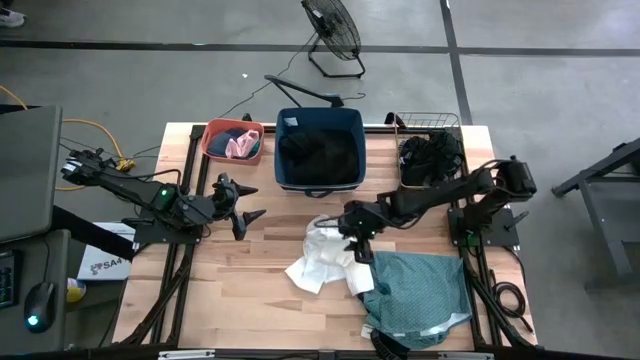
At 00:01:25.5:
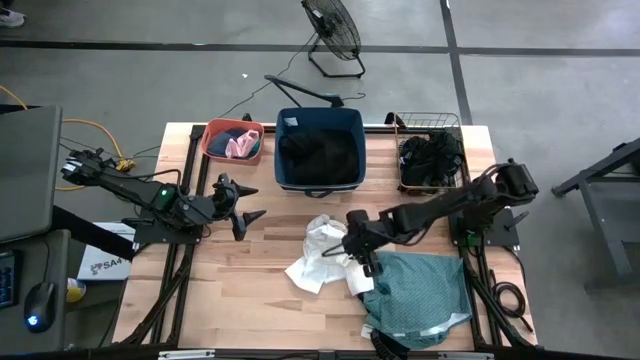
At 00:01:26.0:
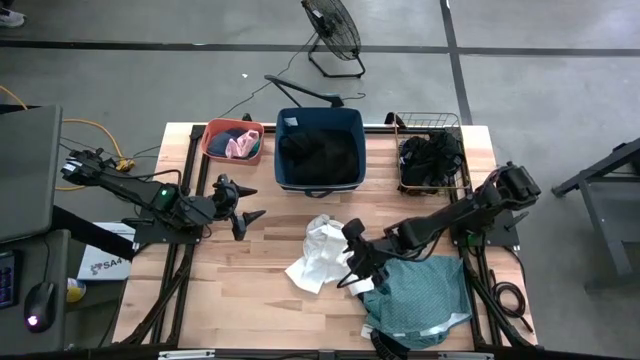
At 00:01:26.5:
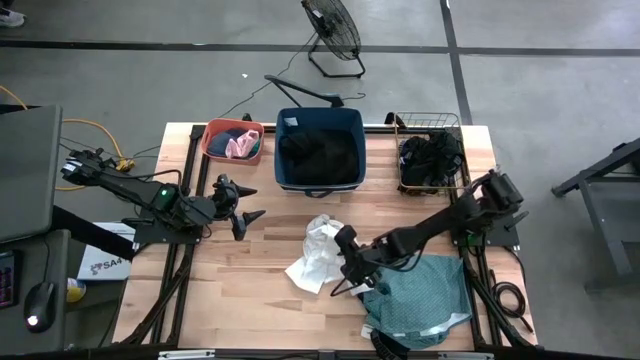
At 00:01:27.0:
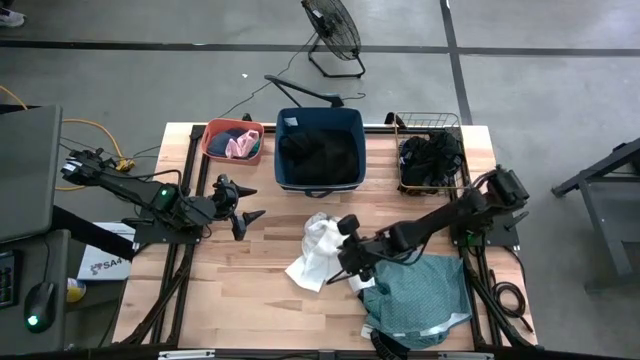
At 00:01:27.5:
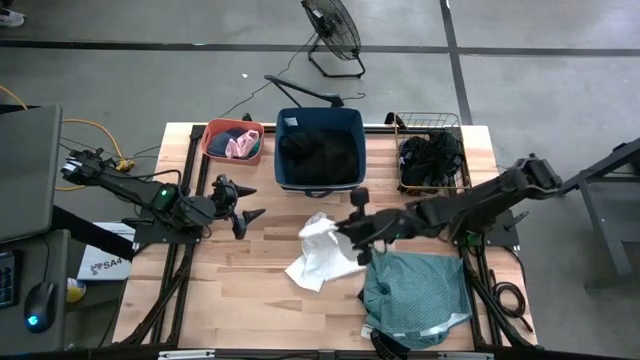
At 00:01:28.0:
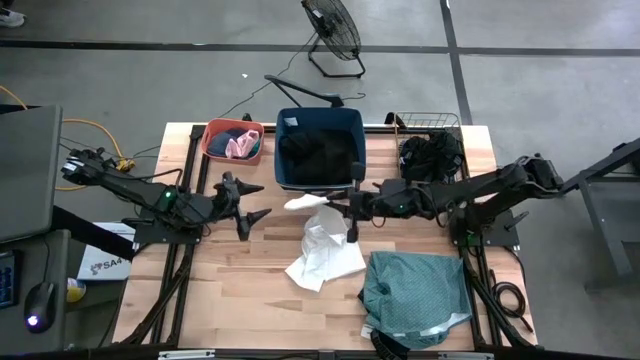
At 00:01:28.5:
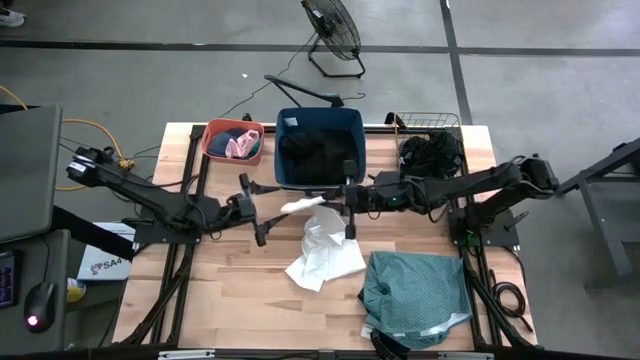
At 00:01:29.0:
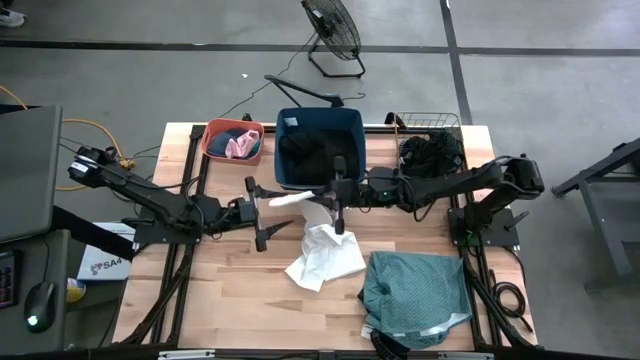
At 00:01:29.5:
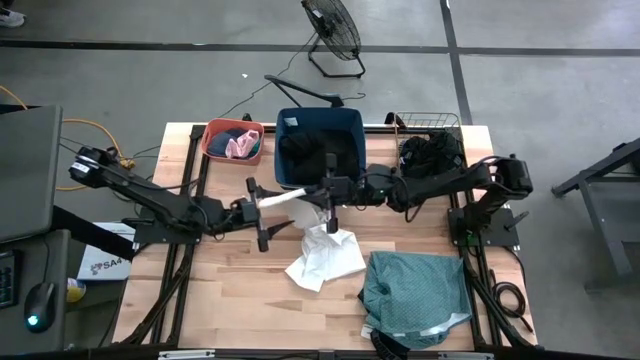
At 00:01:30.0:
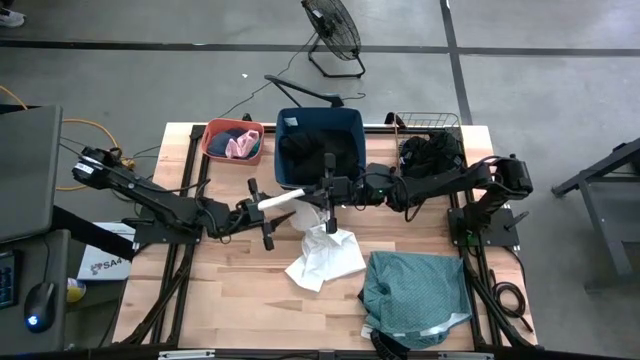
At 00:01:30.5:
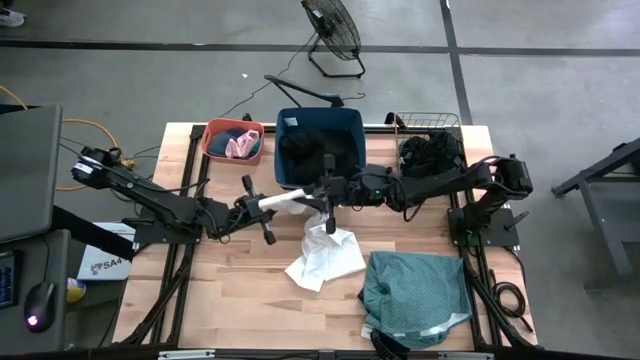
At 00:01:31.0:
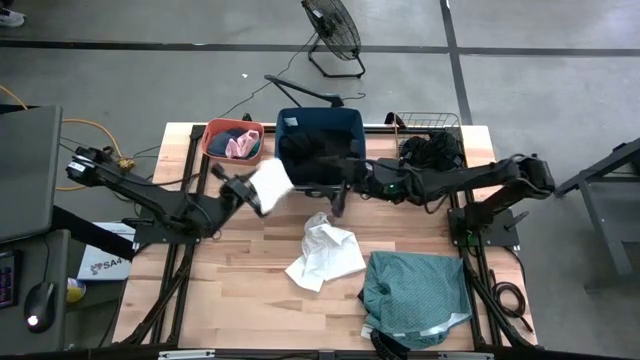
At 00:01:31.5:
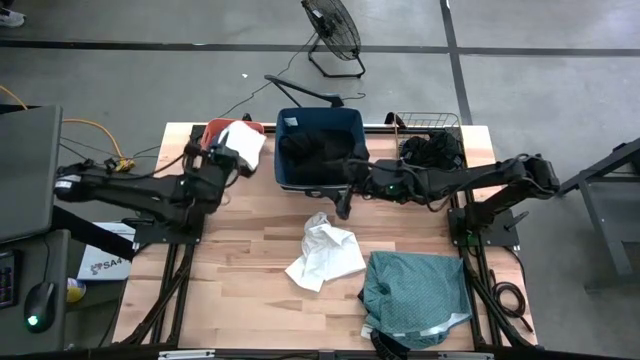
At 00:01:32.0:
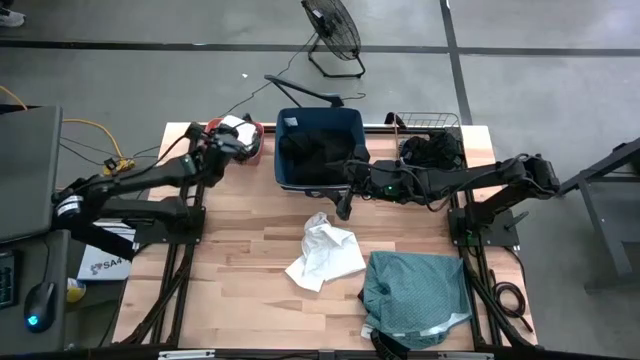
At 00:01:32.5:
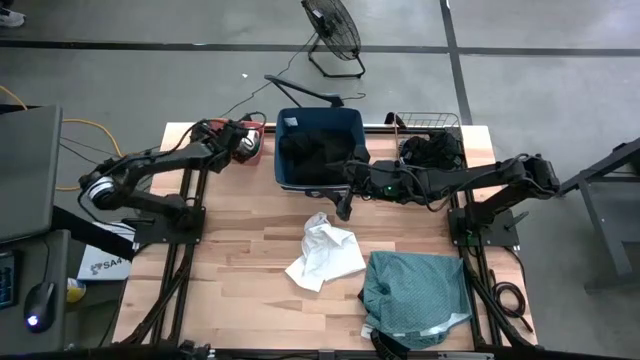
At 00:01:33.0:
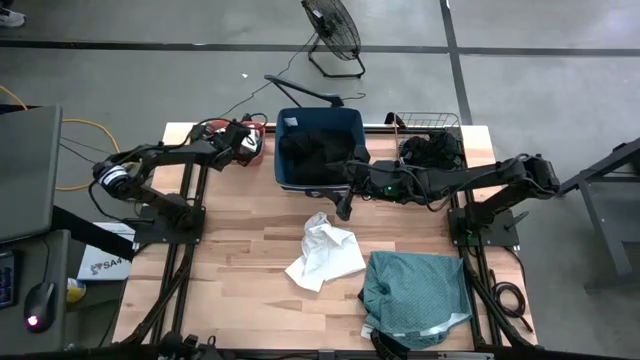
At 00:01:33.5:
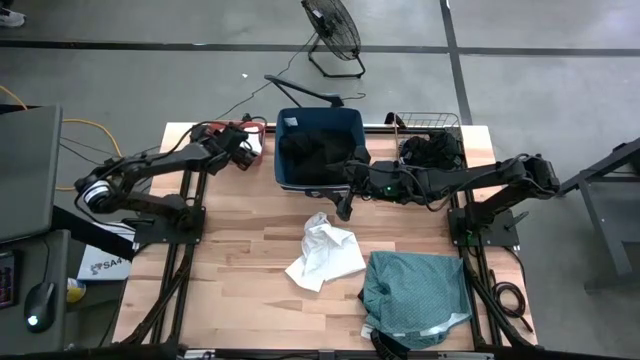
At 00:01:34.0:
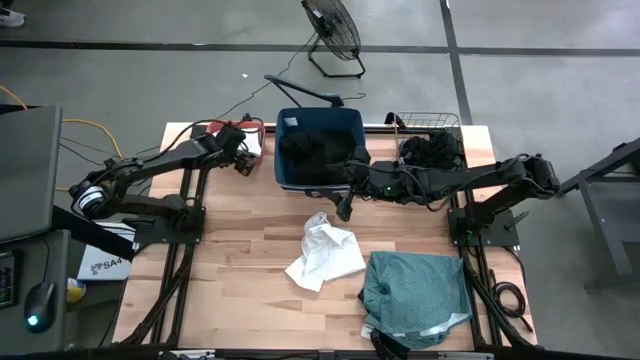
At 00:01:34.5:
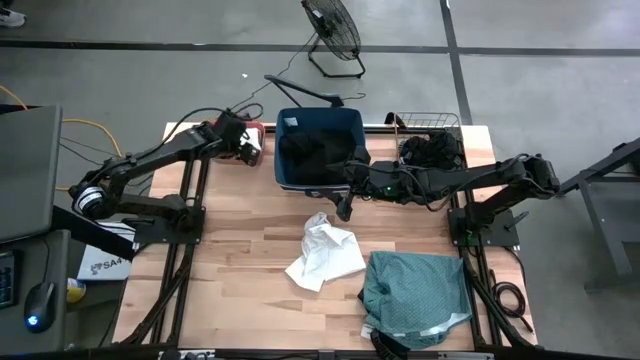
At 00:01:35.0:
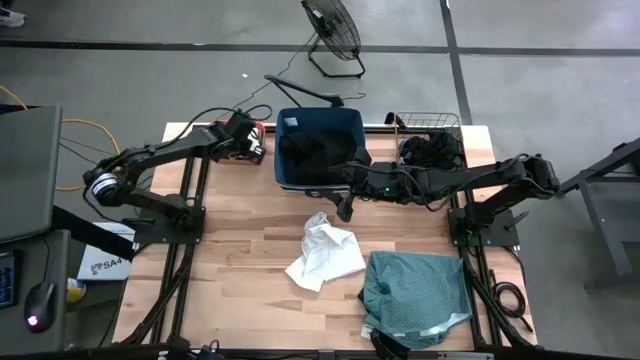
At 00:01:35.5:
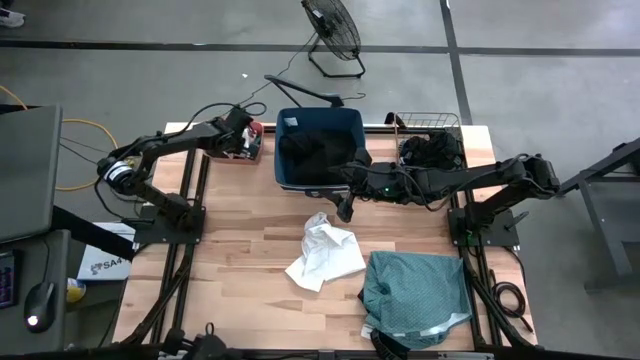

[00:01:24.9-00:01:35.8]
Task: Pick & Place Cloths
Put the white sock into the orange bin

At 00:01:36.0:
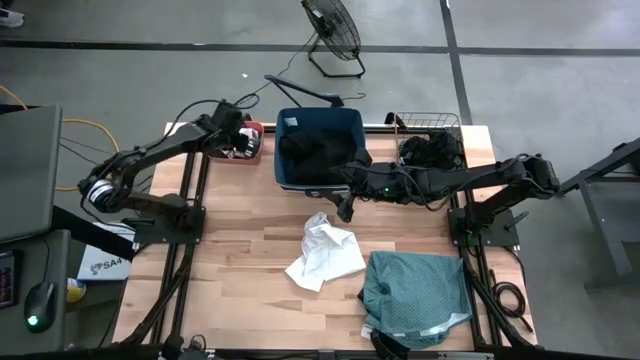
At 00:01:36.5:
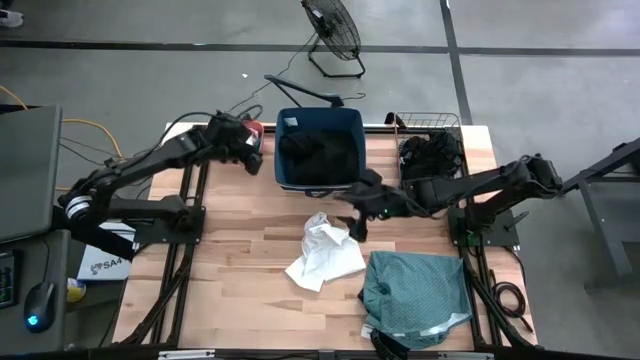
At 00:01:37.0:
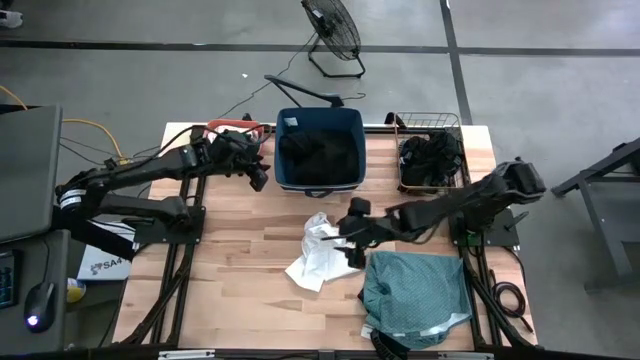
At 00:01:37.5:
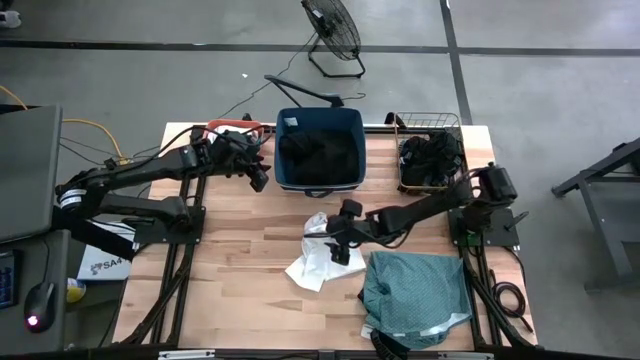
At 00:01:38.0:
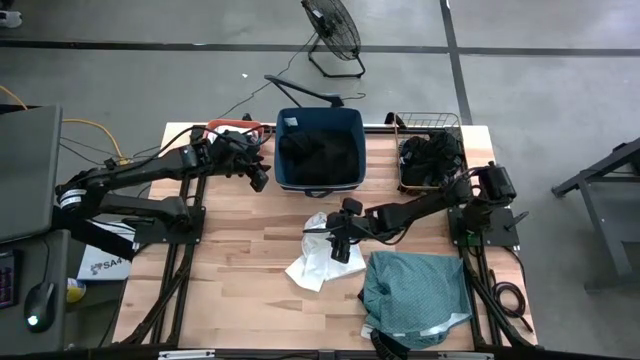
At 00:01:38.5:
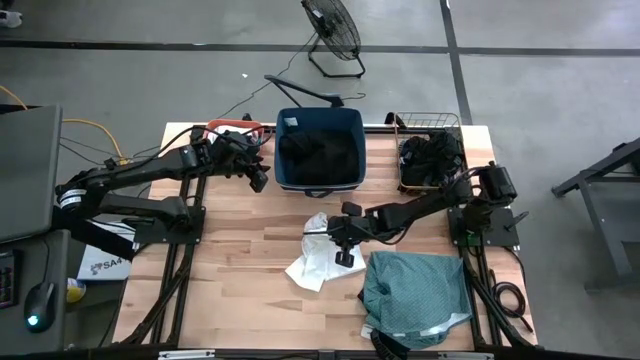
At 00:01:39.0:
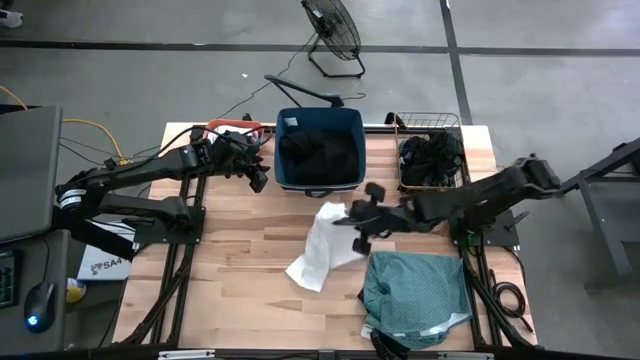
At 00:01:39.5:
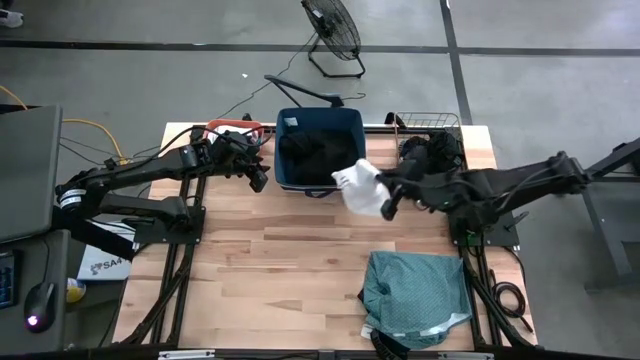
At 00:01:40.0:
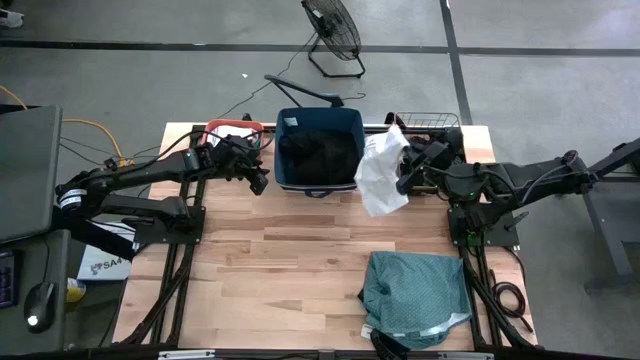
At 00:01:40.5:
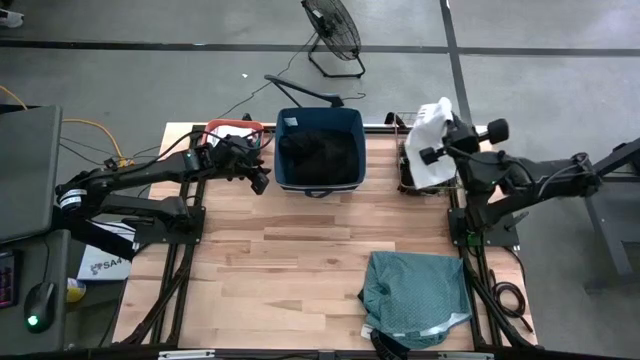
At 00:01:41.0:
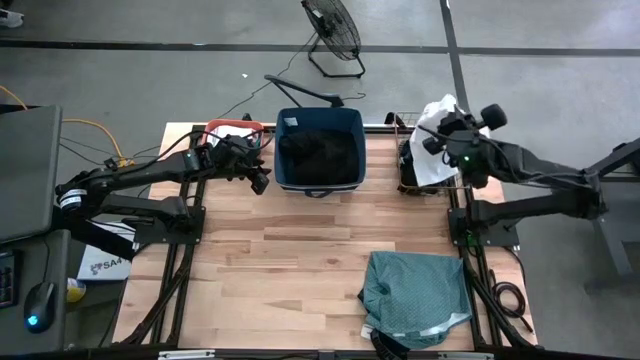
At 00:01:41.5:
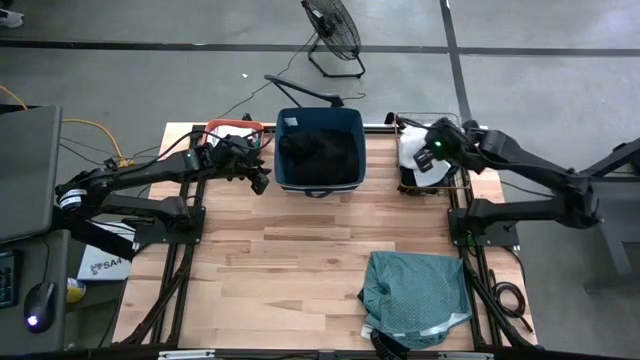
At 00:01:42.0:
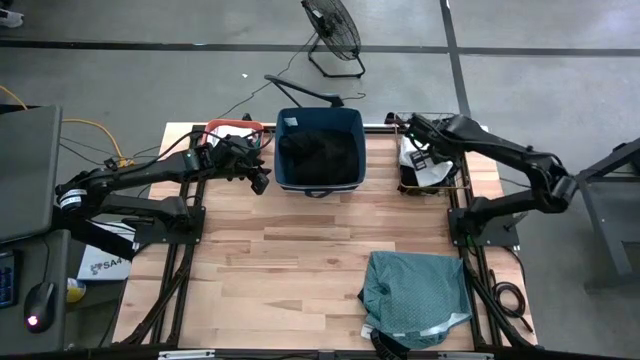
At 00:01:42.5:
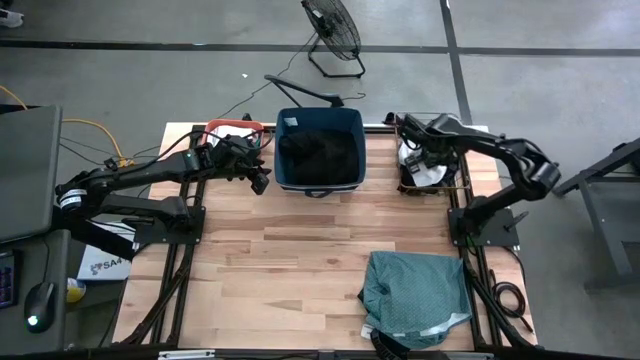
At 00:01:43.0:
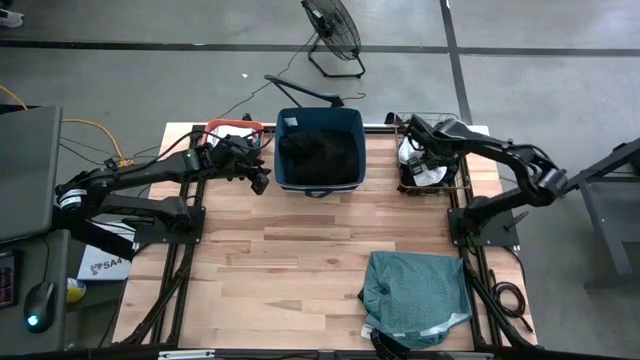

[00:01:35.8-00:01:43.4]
Put the white boxer into the wire basket

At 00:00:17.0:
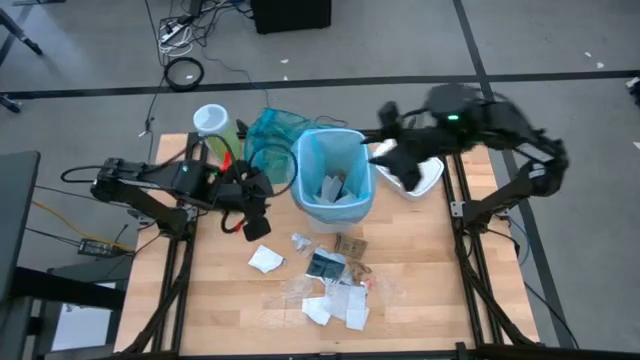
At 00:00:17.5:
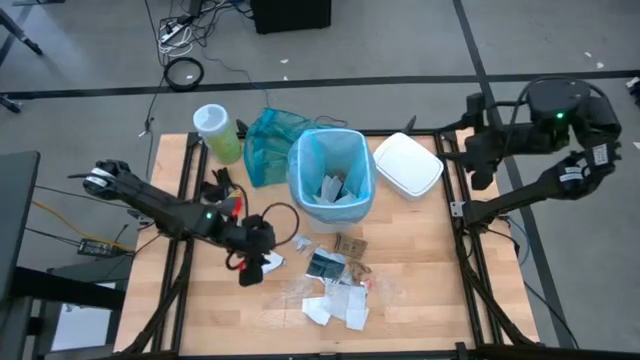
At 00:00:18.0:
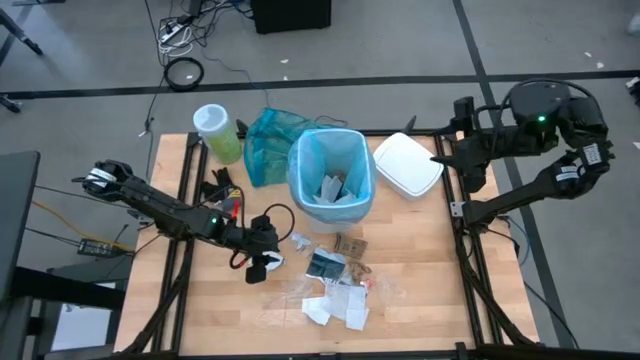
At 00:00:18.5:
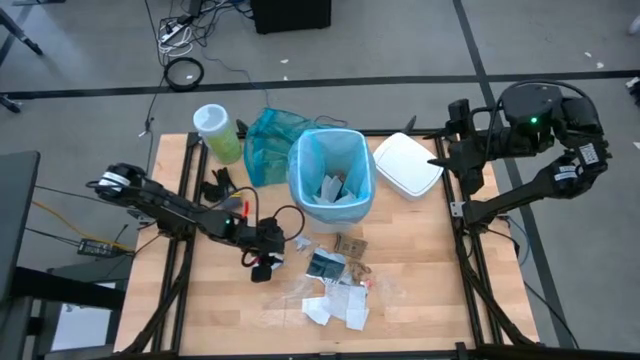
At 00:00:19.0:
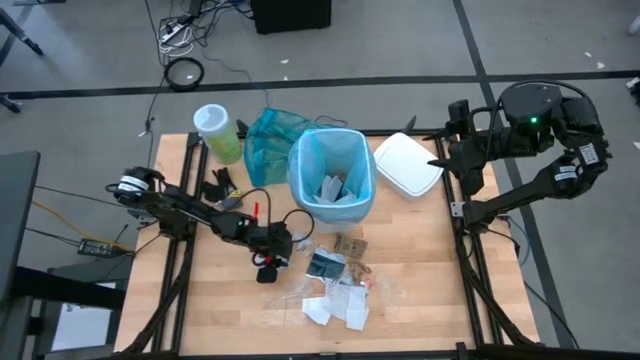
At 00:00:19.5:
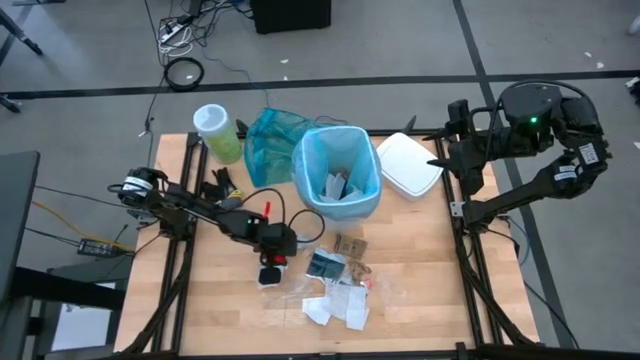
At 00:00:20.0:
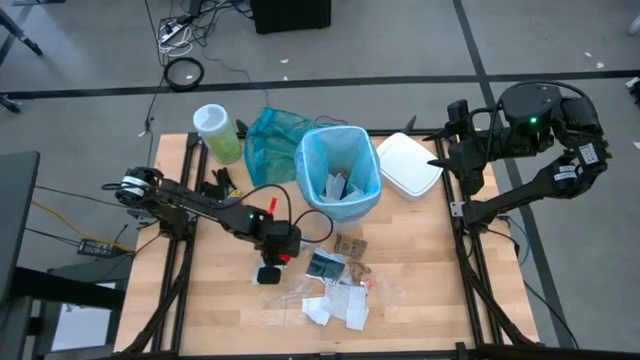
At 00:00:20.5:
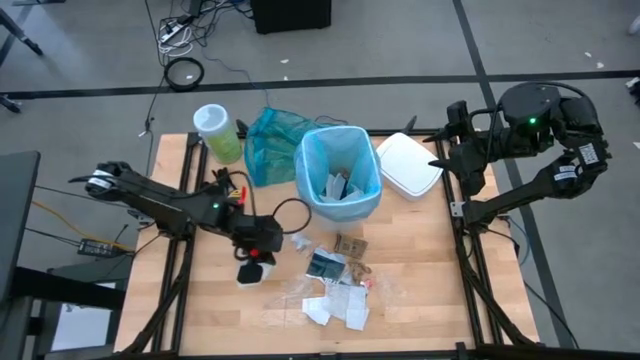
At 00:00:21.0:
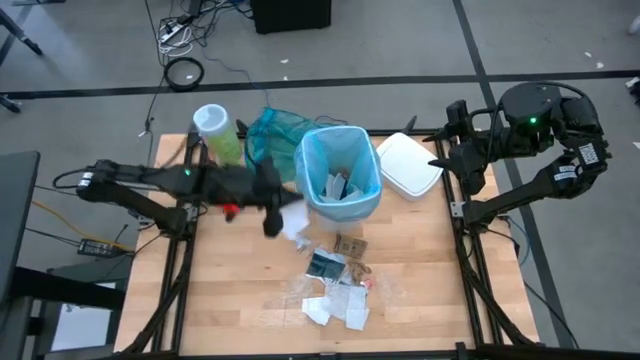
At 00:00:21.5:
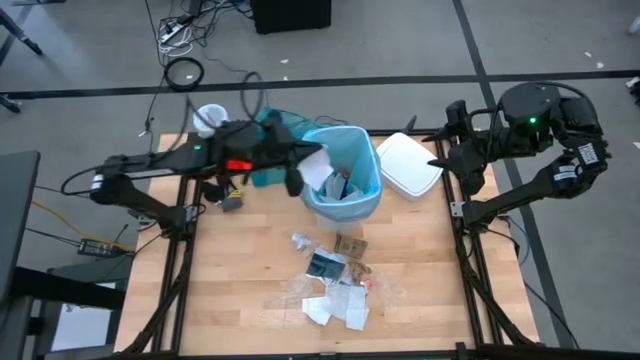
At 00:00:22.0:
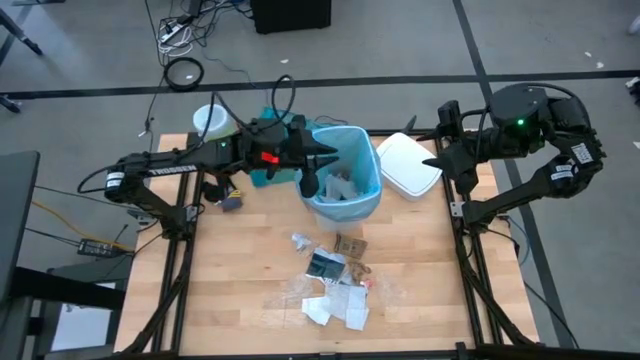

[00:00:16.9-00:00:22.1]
Task: place trash/remove bag and relplace
Put the white paper into the white trash bin
